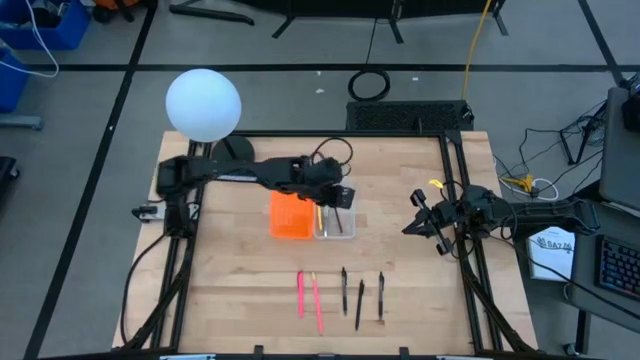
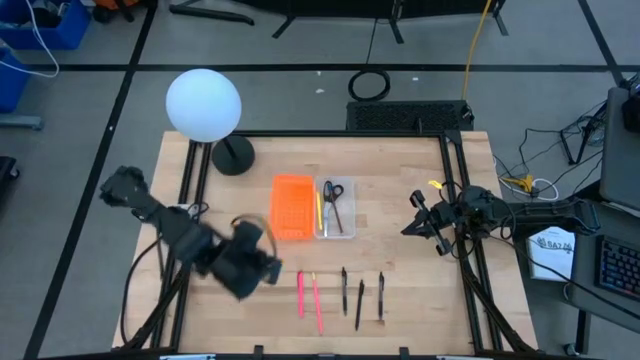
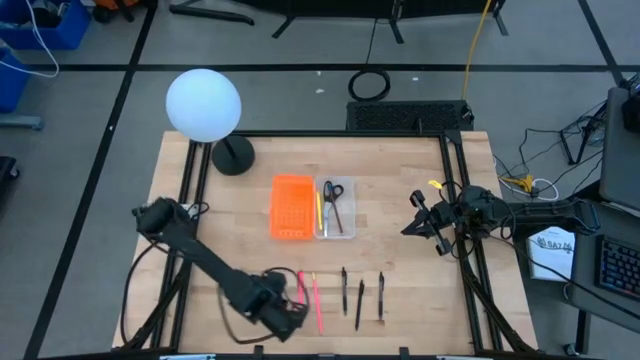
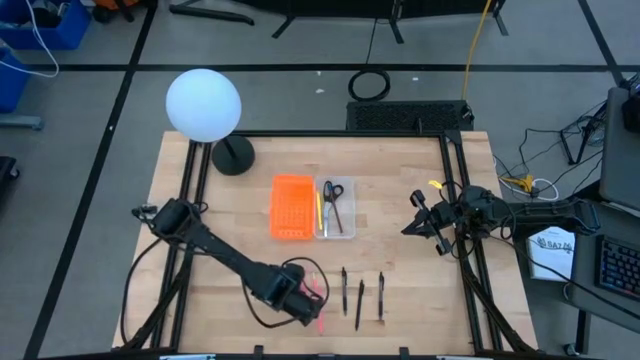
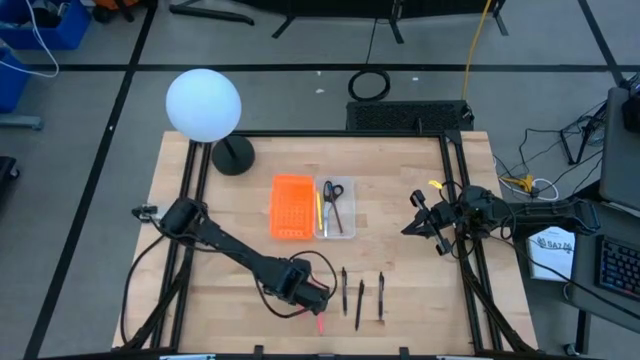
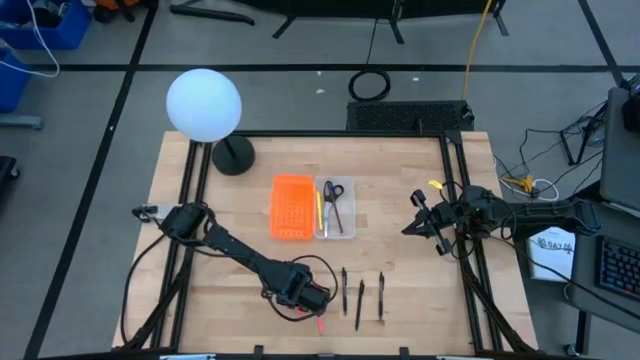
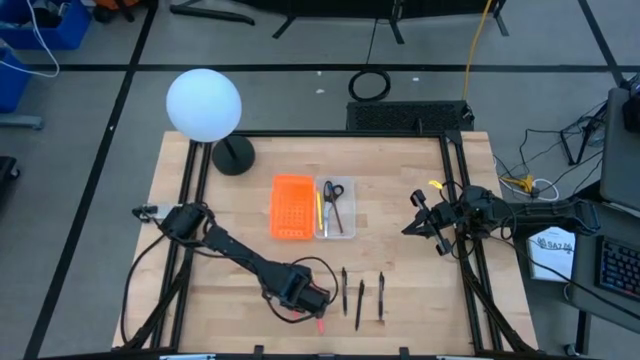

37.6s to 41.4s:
Task: Pick & place school supplies into a supply box
Put the pink pen into the orange supply box

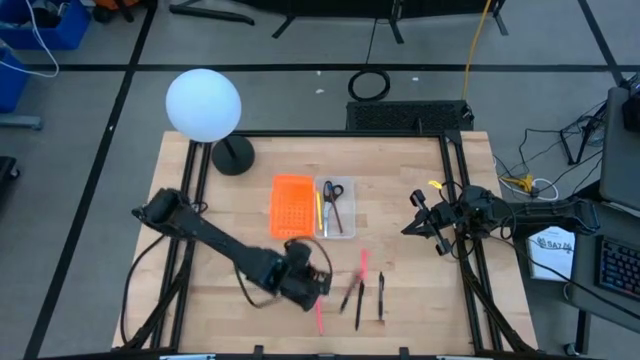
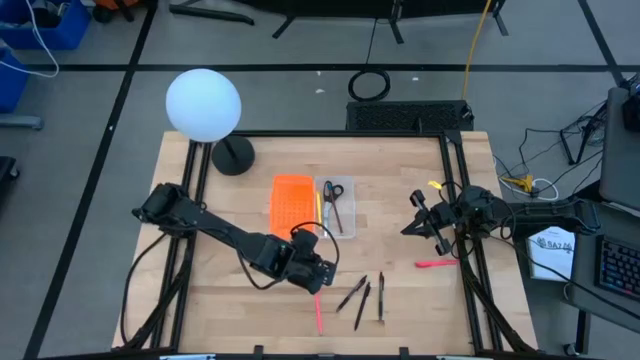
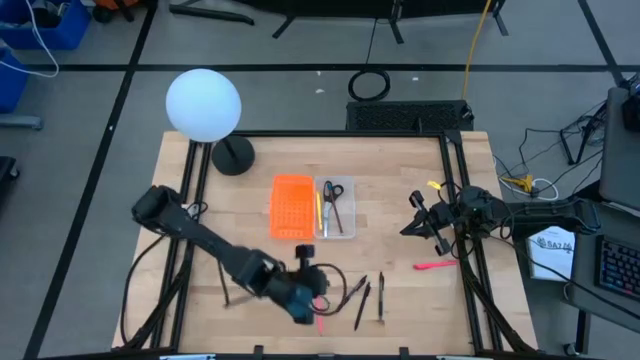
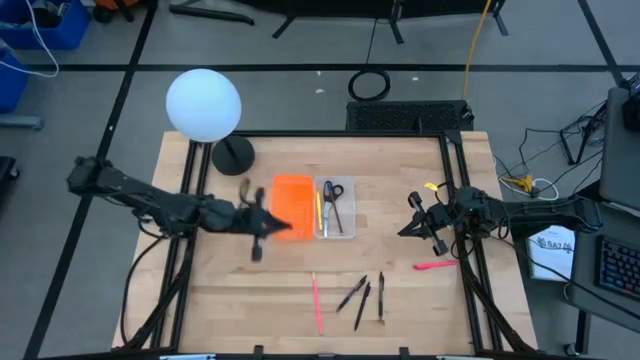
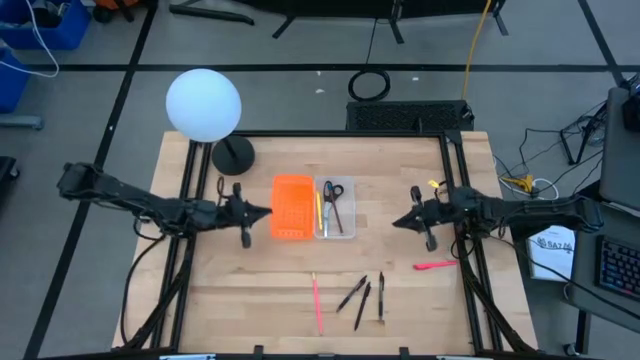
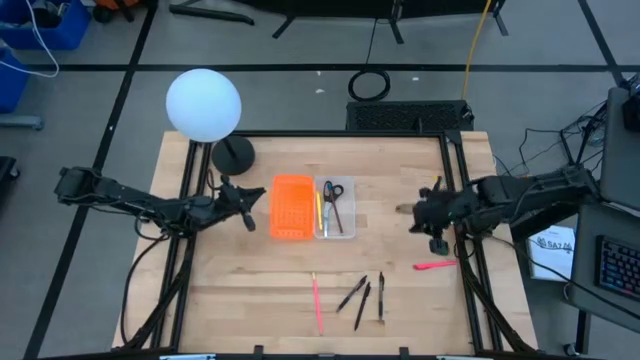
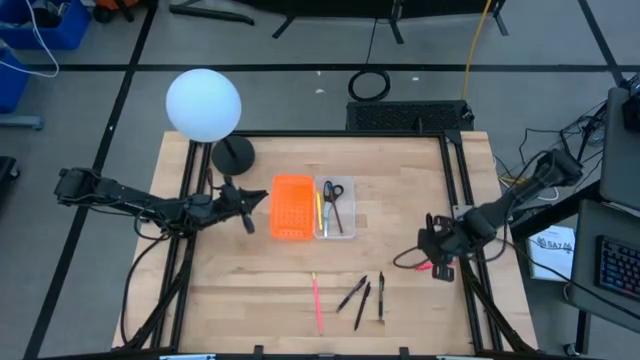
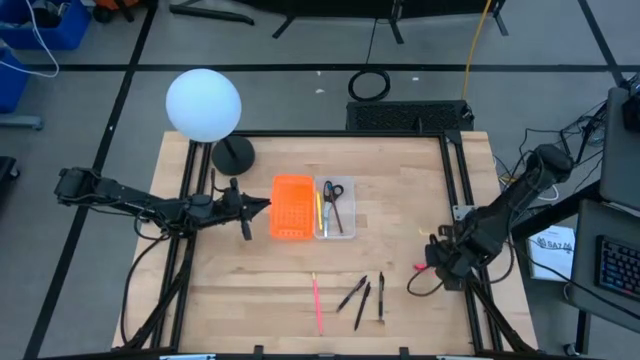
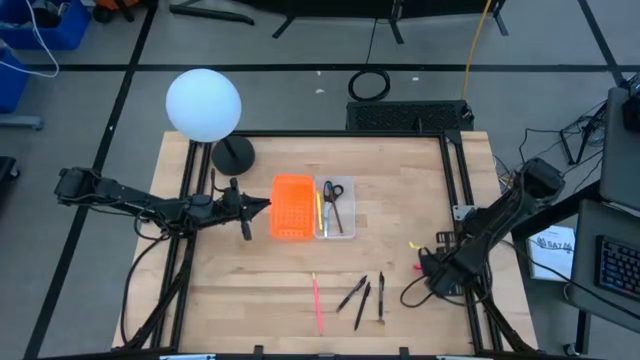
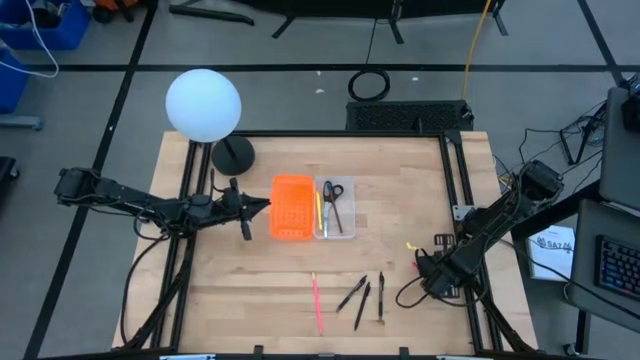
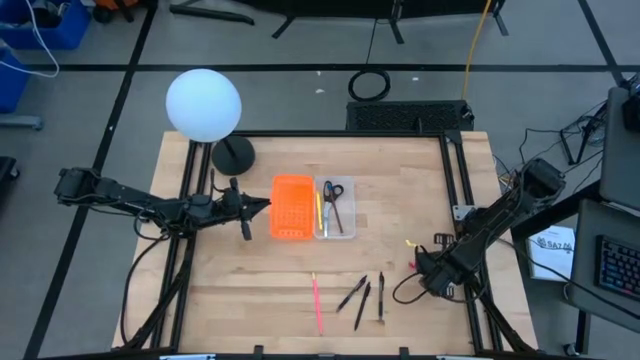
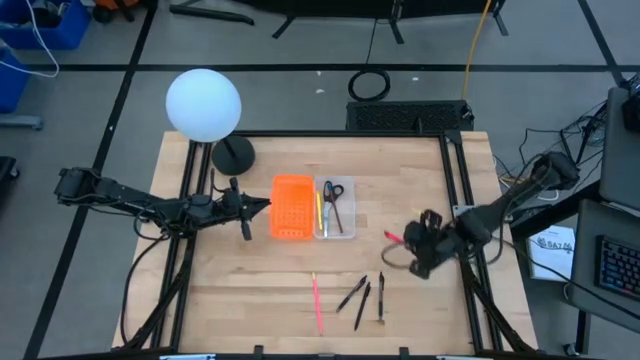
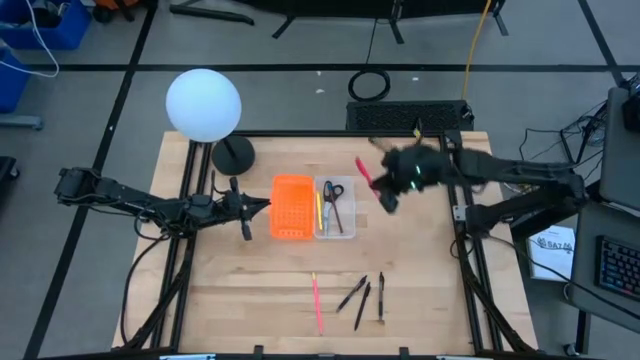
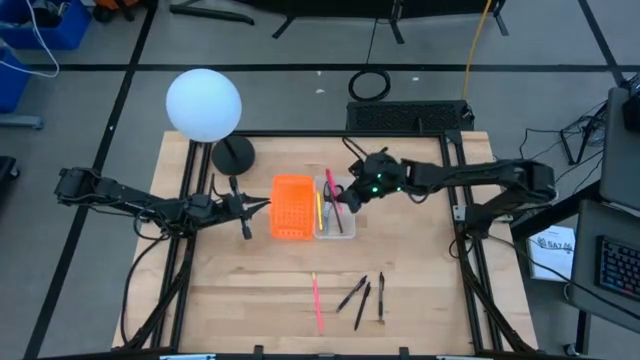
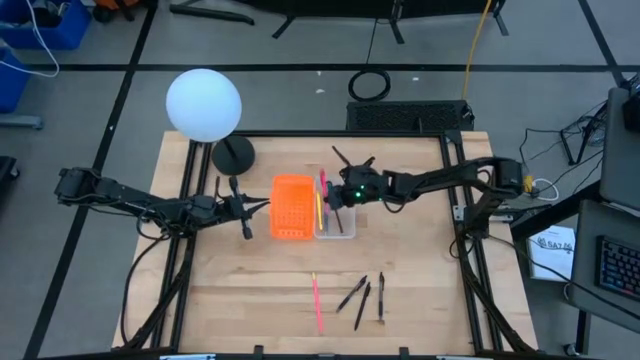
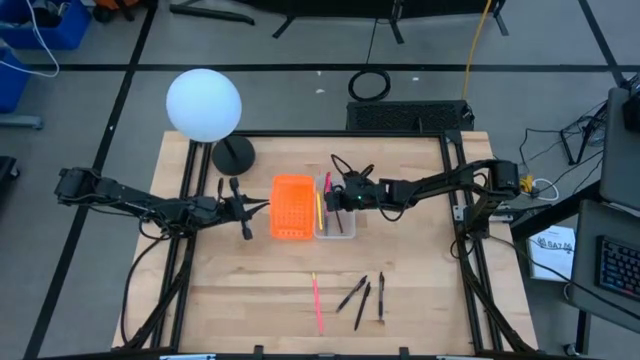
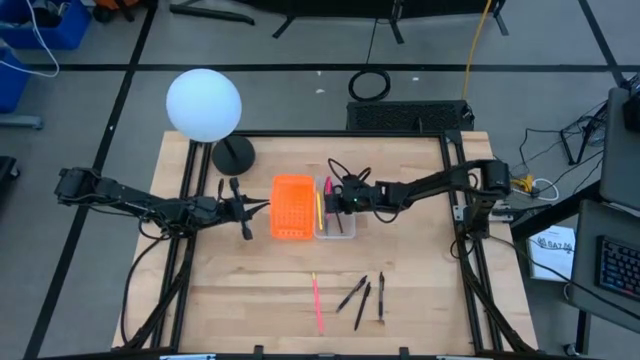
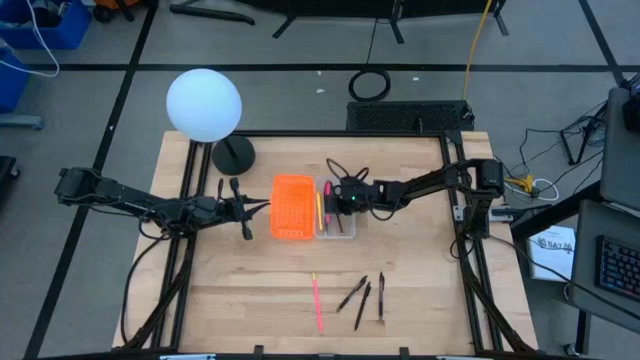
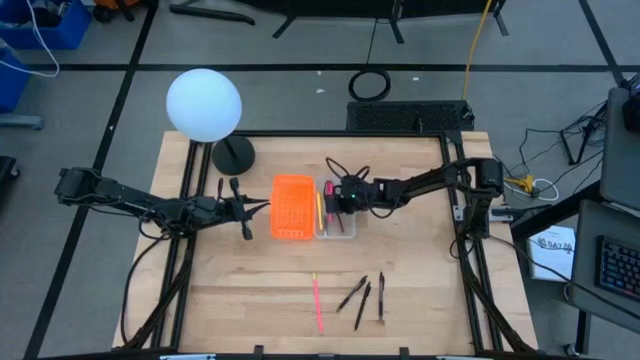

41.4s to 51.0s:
Put the pink pen into the orange supply box

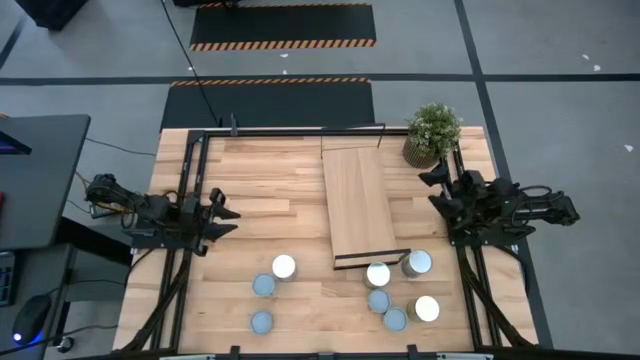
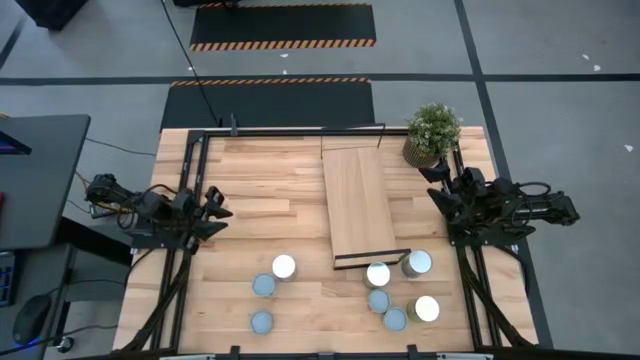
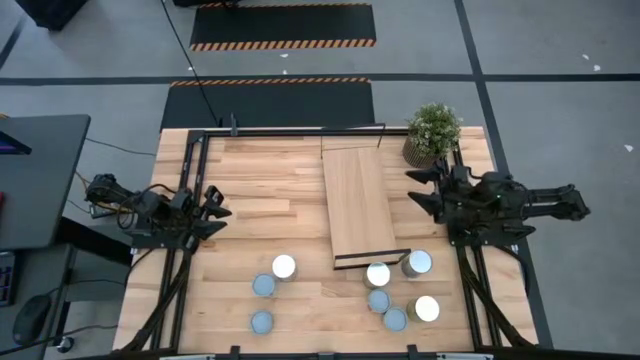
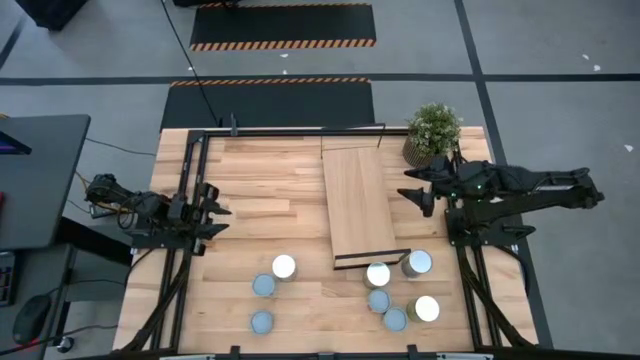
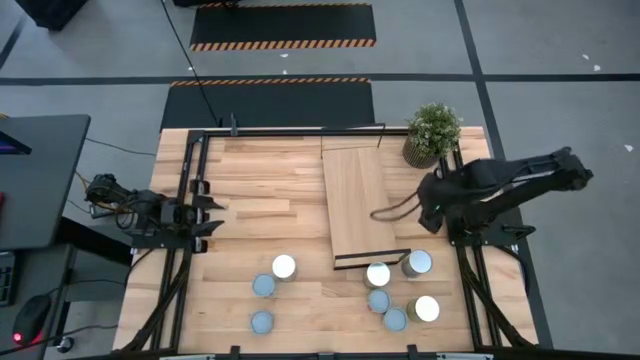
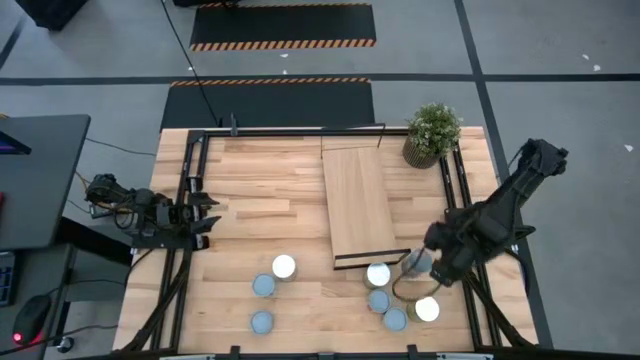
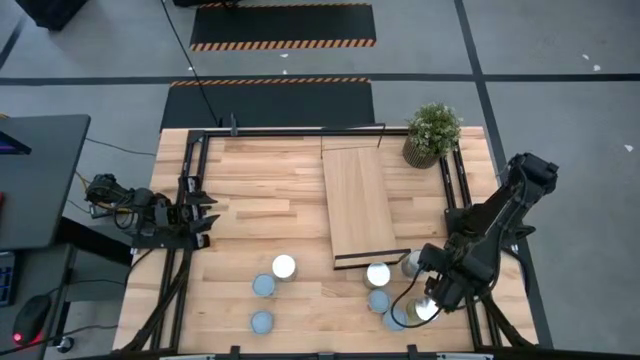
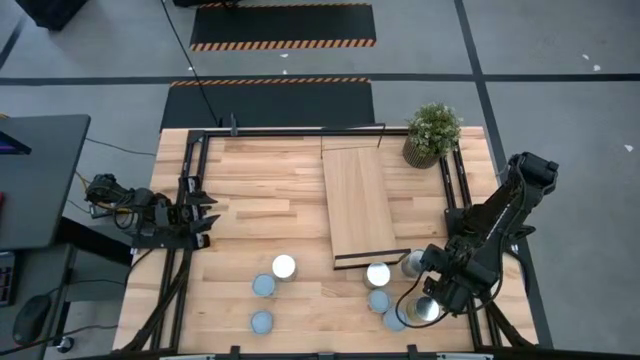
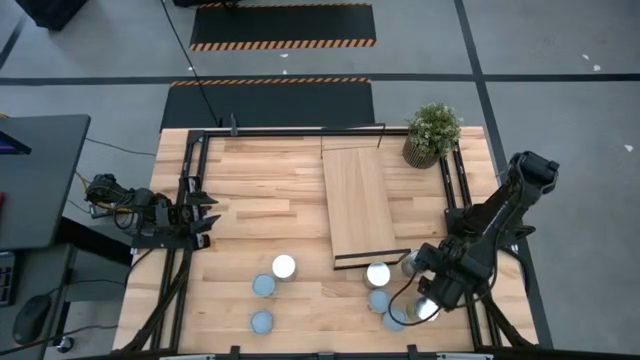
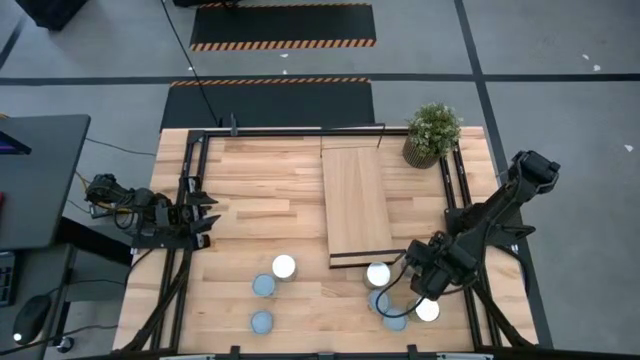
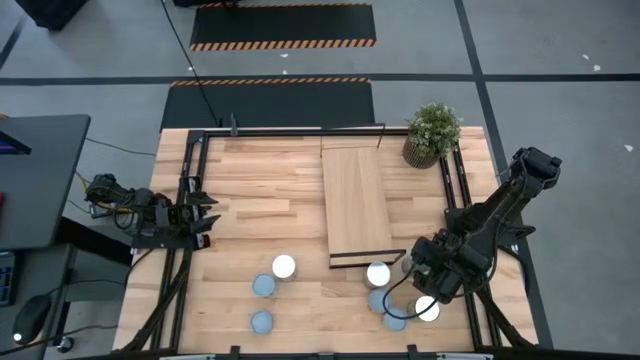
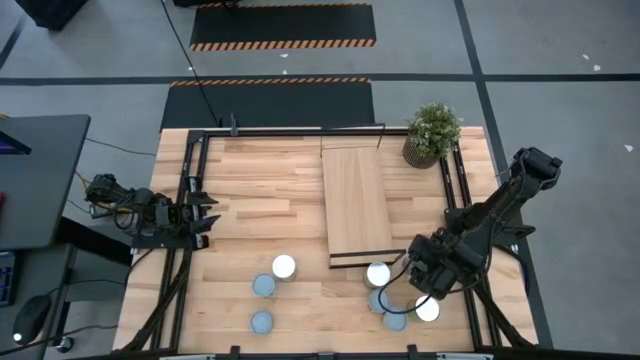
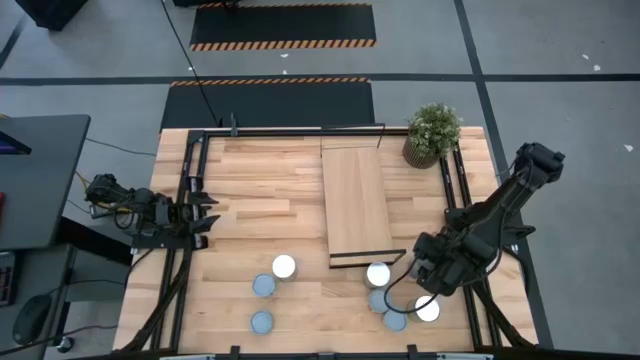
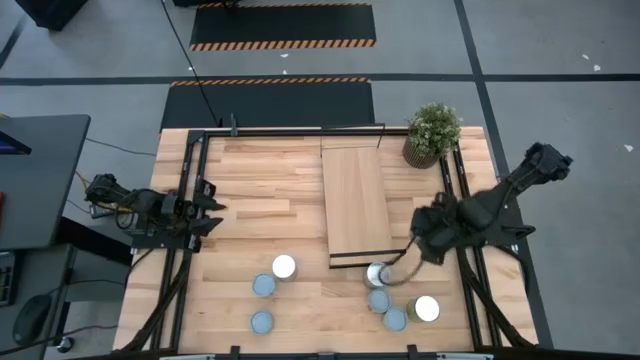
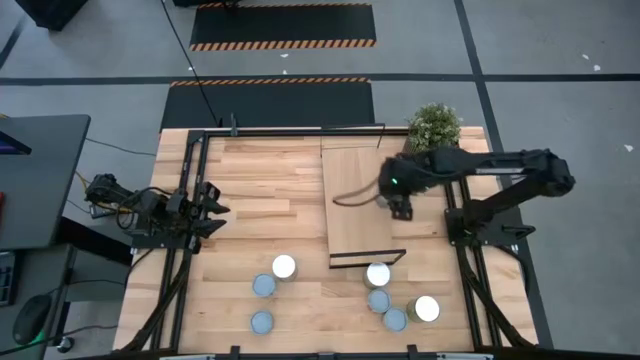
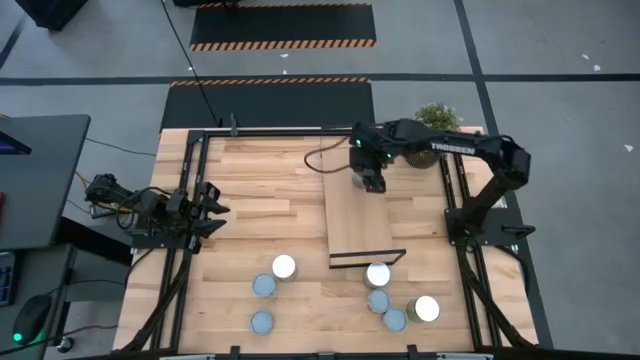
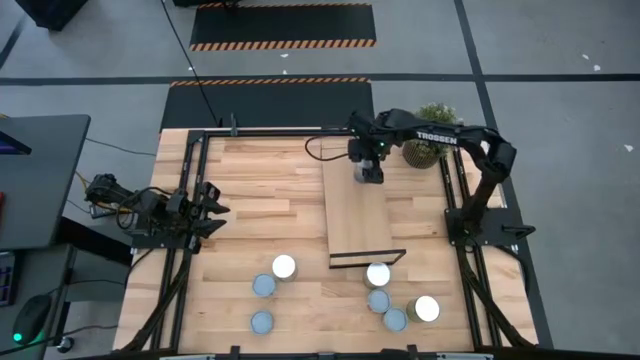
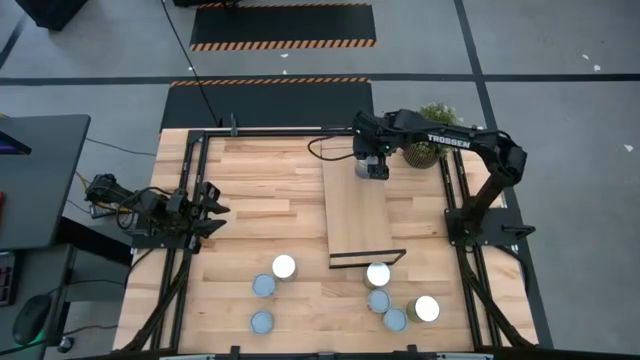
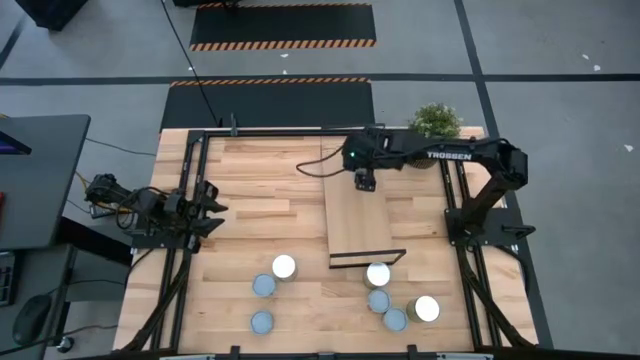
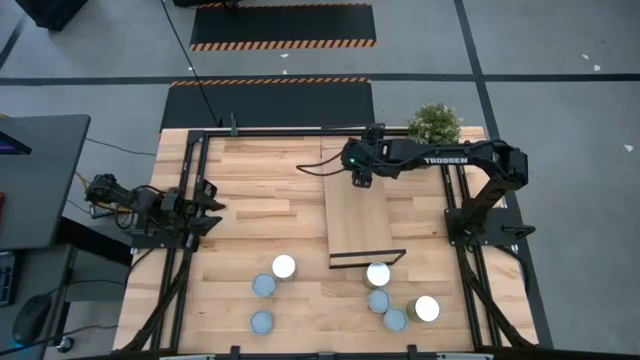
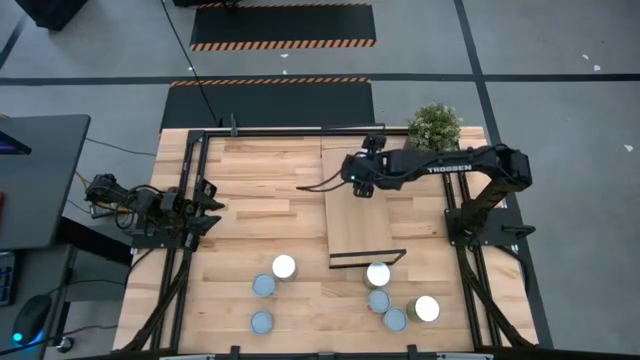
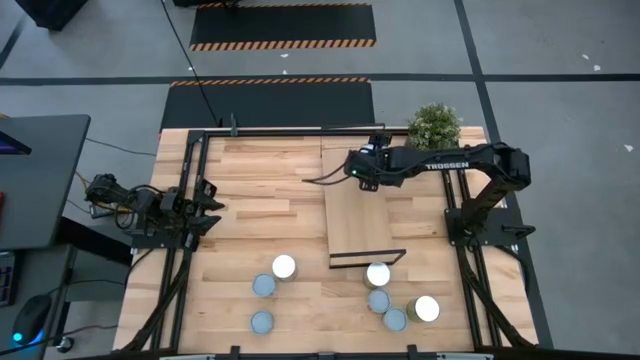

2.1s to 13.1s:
Task: Pick and place cans onto a shelf
Put the right canned peaches on the shelf
